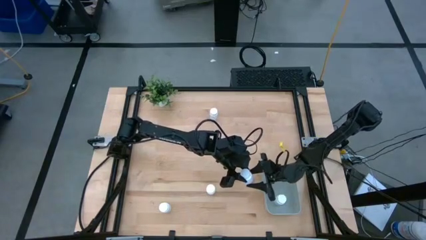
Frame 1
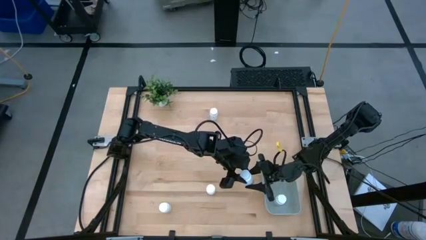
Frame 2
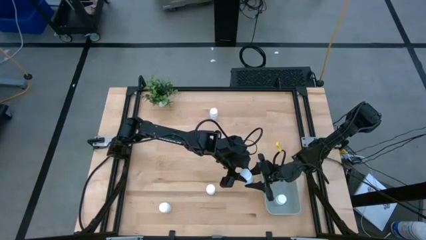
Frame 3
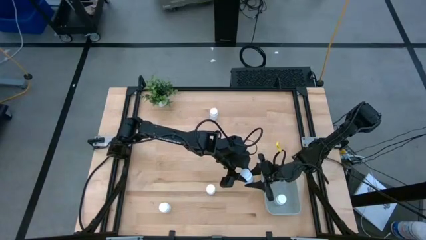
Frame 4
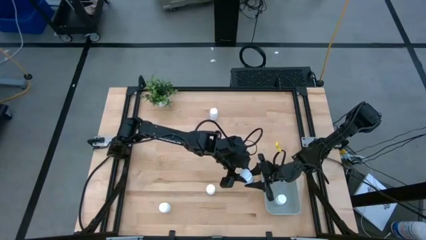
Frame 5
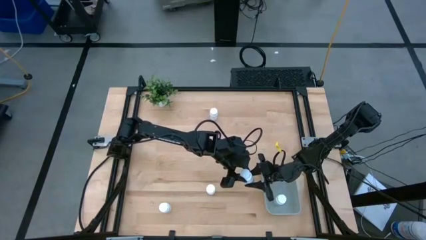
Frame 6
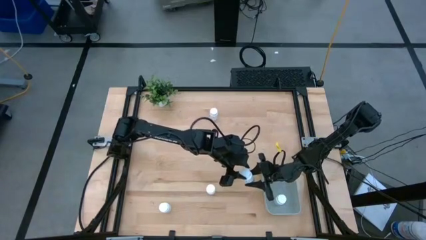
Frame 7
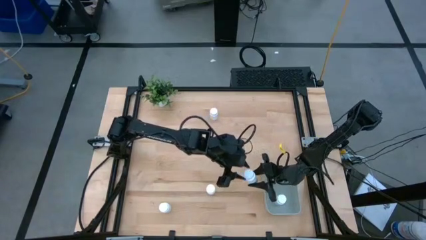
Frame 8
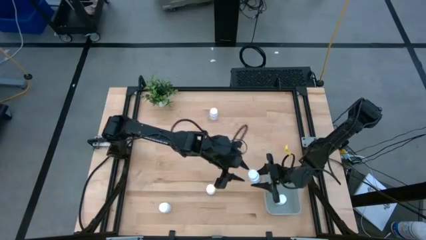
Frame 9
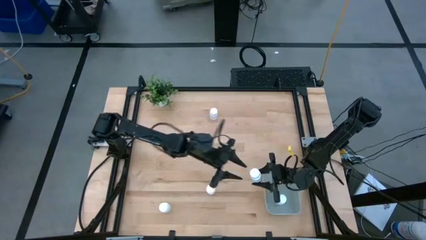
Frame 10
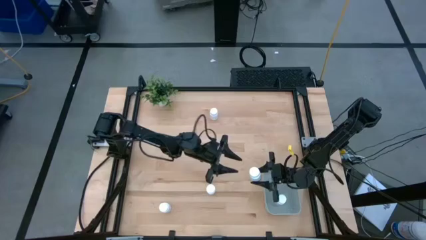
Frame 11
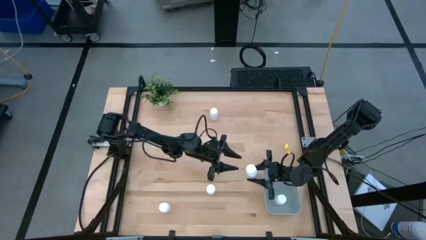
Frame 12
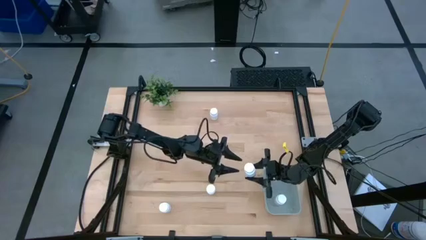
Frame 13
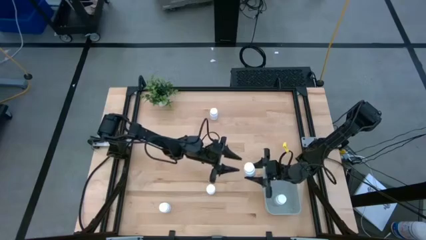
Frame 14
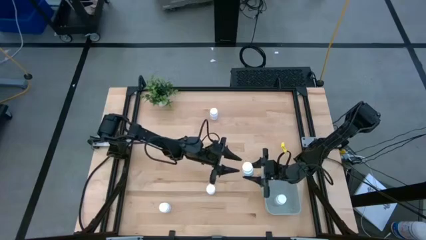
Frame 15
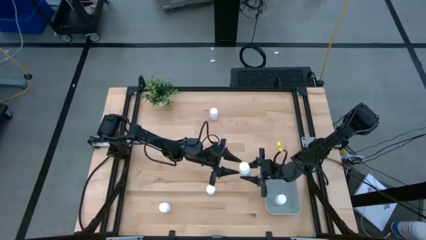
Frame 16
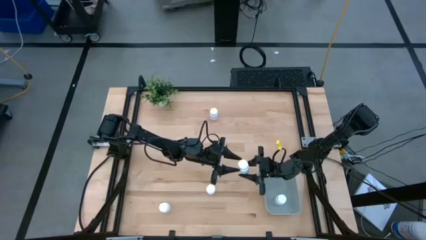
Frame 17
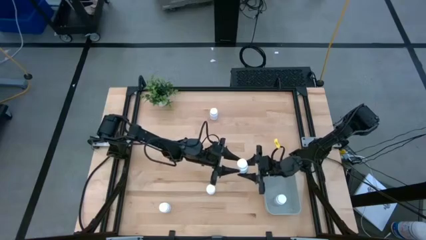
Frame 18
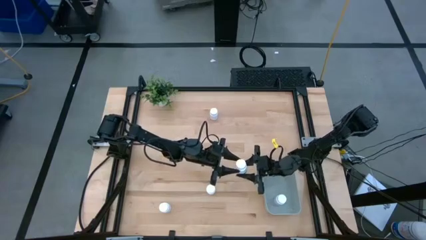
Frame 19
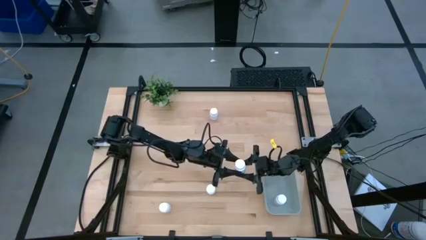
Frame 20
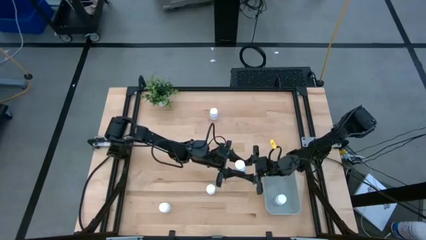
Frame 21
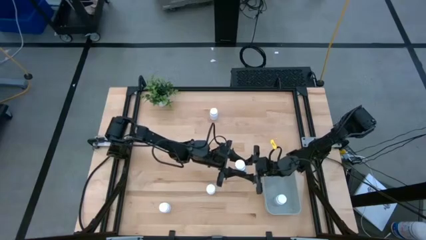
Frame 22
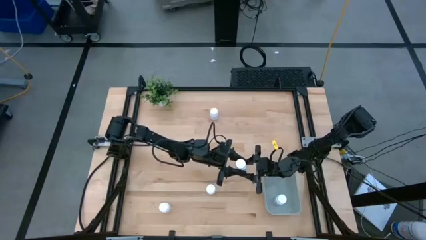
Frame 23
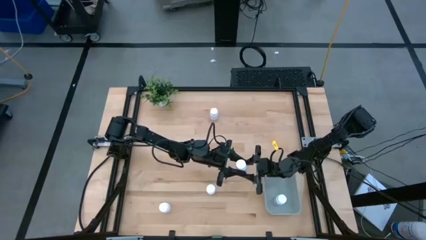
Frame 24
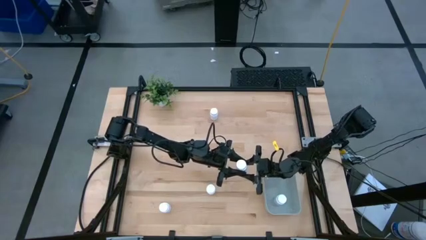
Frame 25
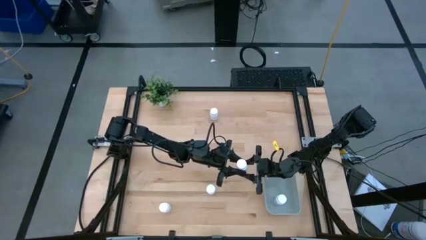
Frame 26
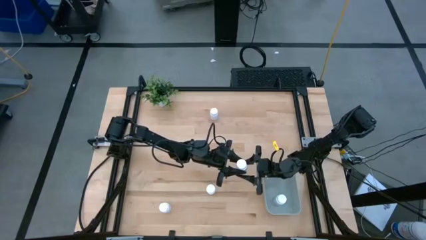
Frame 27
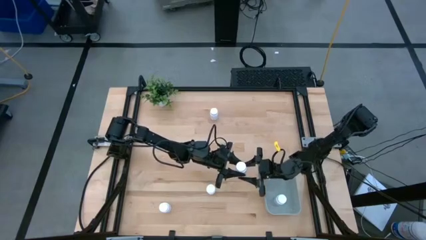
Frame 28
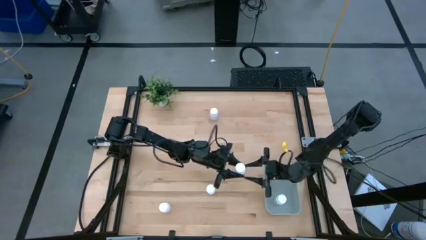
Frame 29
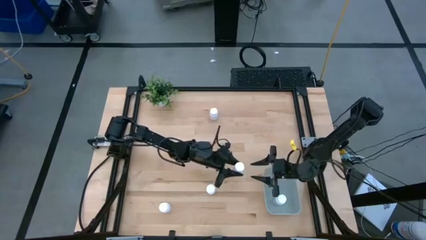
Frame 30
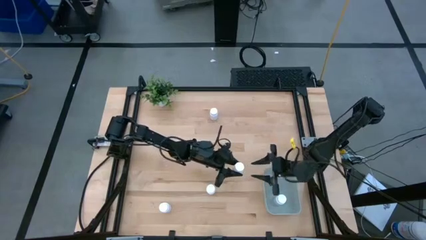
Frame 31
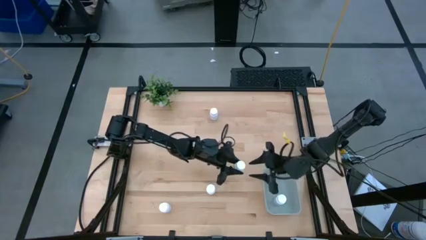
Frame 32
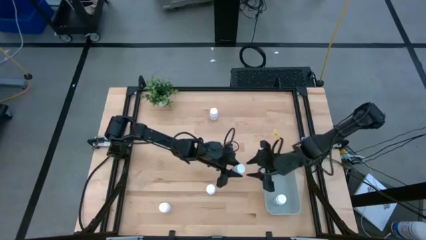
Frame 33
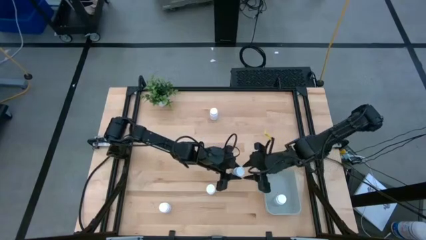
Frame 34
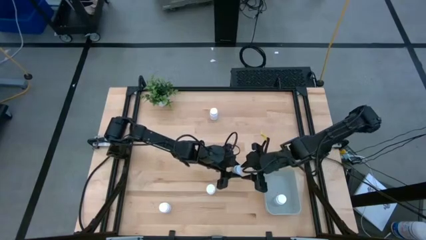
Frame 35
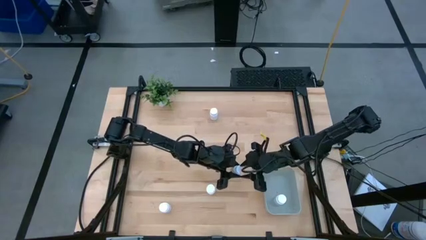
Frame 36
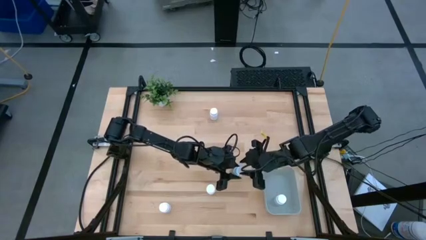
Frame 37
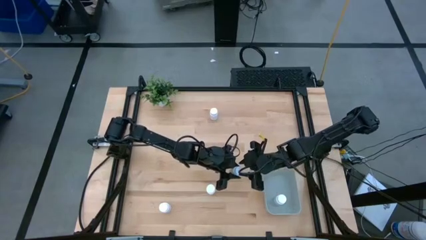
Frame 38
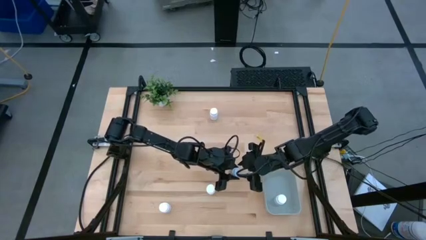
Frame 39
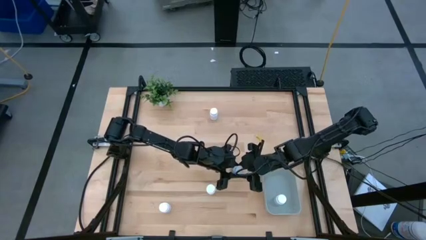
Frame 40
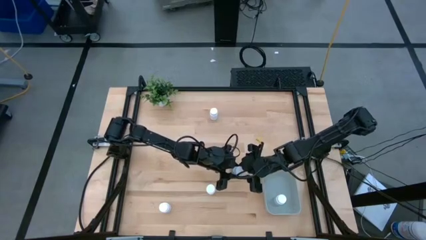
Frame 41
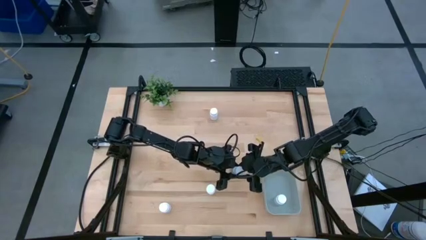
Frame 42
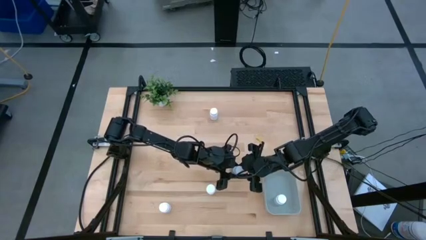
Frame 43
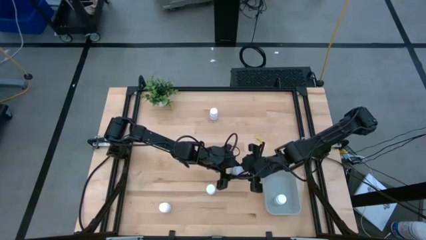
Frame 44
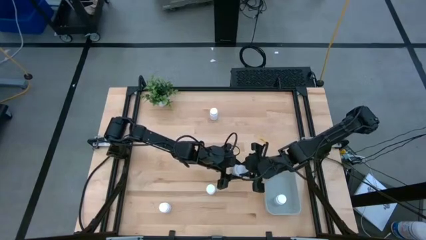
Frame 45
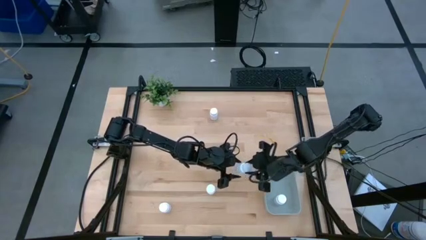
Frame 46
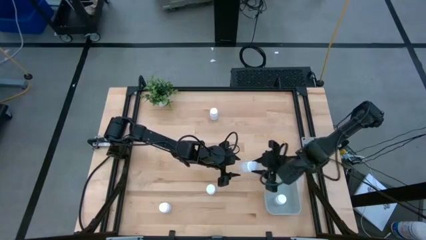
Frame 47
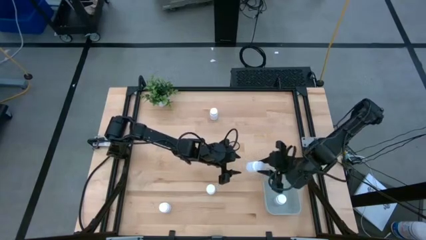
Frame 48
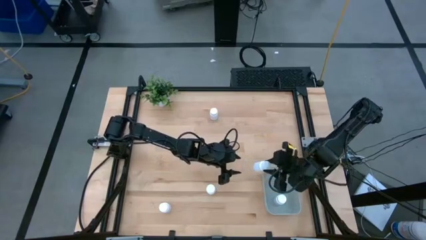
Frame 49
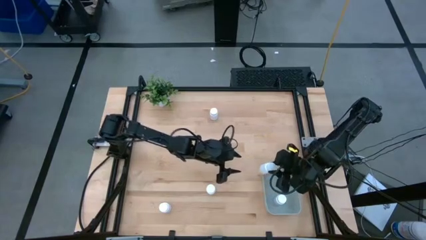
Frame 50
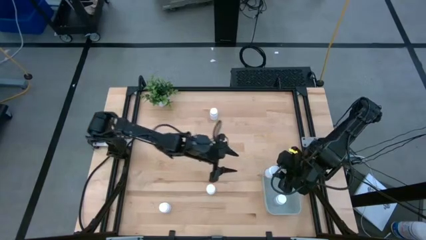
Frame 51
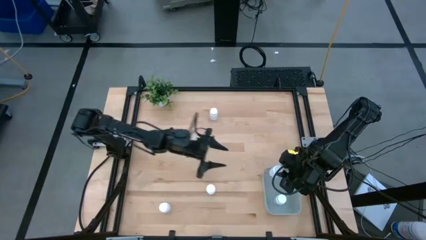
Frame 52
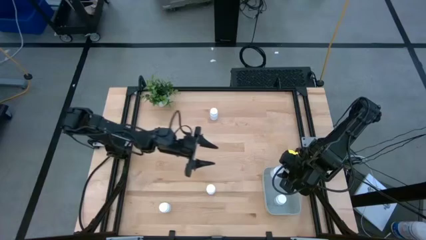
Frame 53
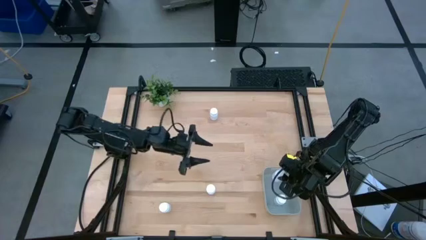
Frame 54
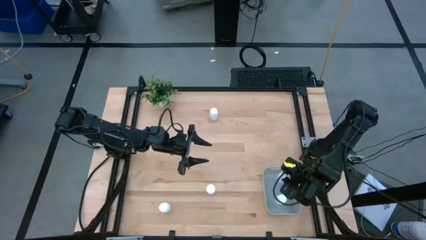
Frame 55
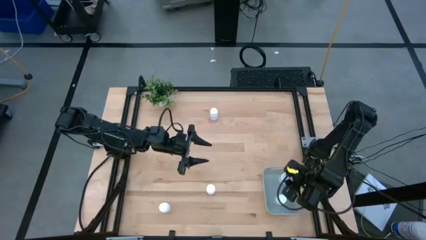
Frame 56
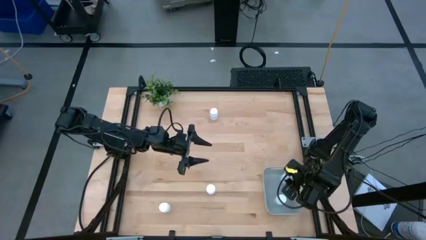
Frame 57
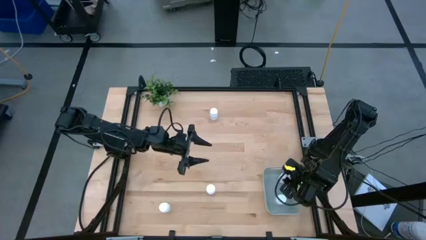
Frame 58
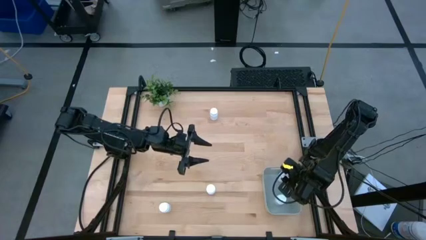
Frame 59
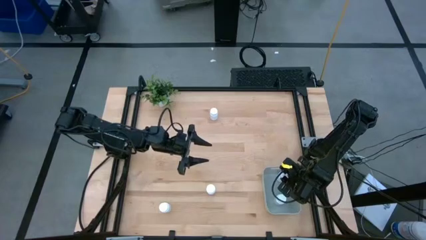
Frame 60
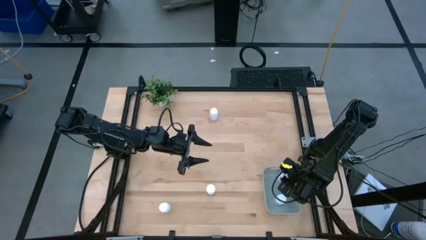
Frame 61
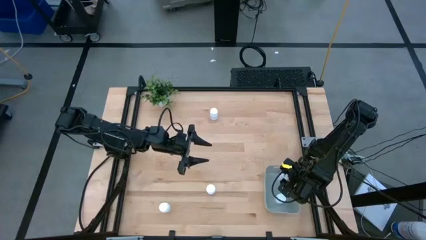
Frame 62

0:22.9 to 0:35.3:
Task: Pick and place pill bottles into a basket
Put the white pill bottle into the gray bin

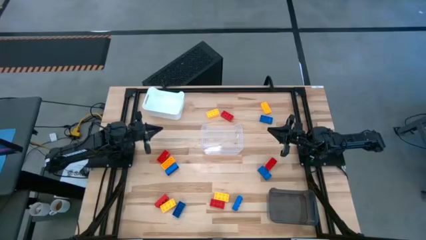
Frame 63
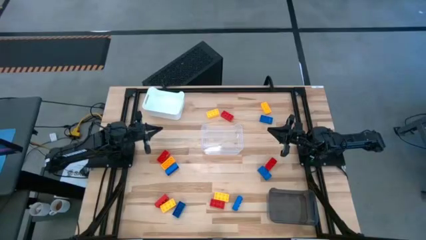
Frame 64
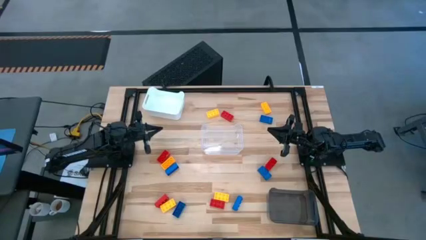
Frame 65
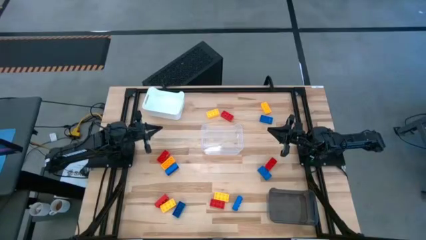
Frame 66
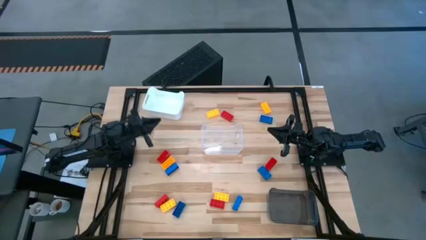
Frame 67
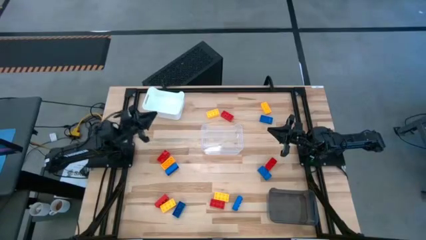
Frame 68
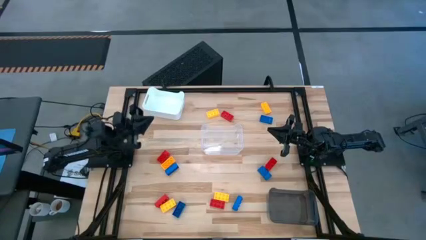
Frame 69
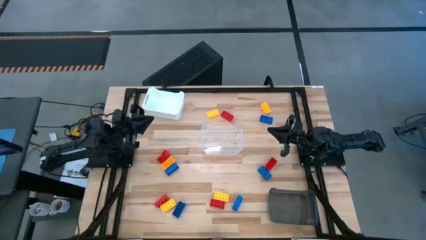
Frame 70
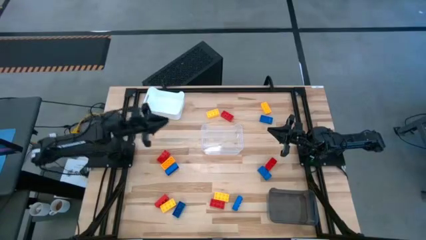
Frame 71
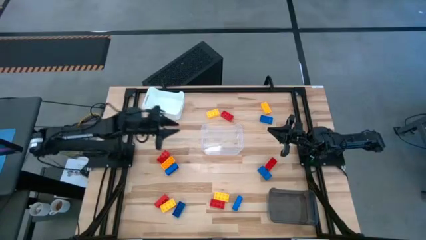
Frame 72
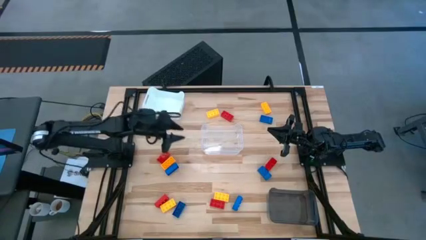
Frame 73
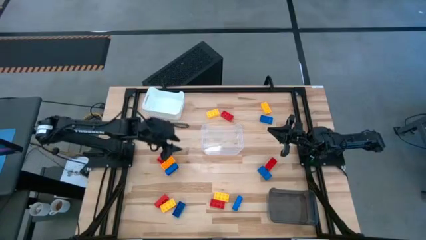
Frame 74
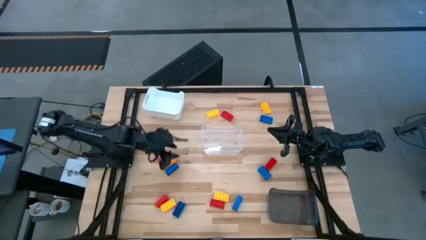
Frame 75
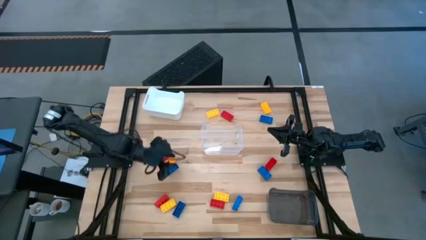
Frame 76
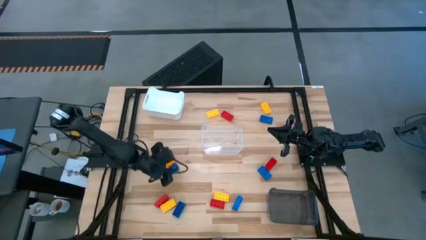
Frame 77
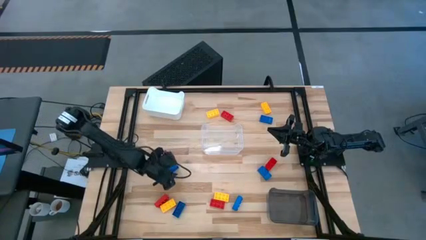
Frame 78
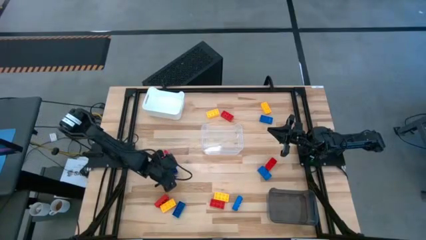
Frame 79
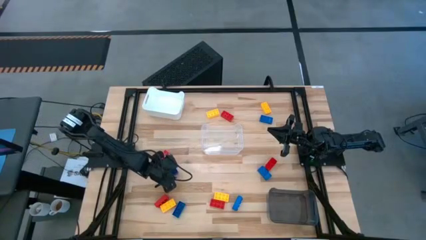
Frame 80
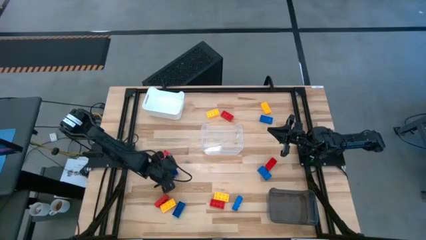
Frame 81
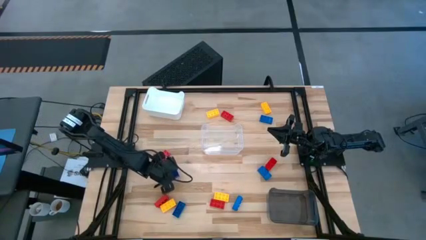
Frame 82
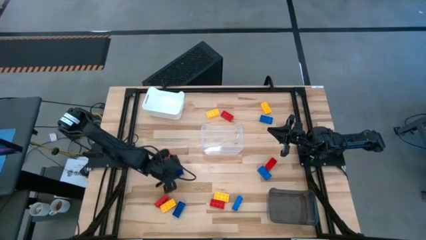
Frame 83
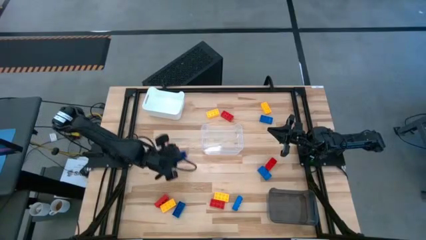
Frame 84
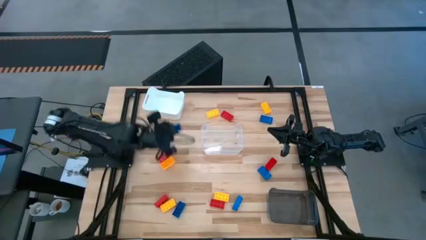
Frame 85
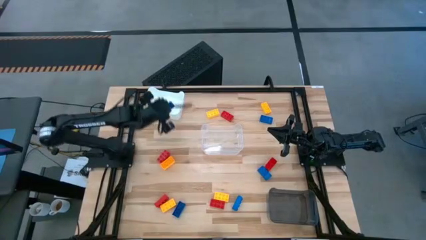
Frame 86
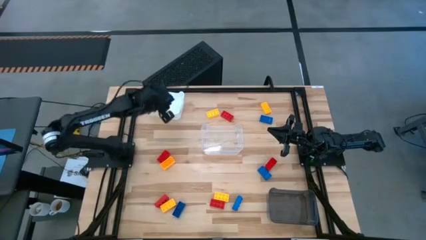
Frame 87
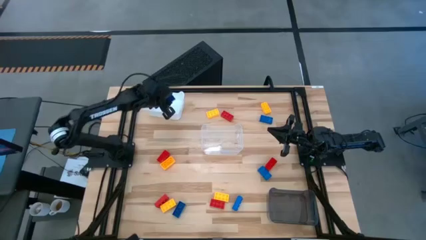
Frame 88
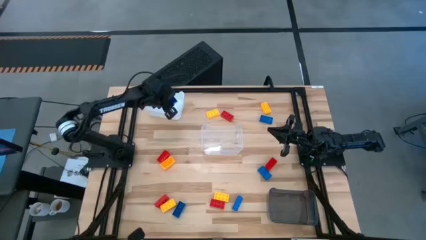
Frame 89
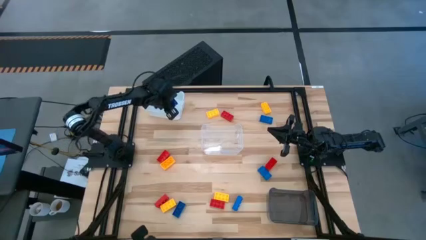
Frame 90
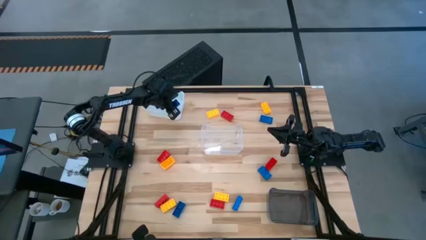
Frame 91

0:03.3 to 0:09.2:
Task: Sort & place blocks by color
Put the blue game piece into the white bin
